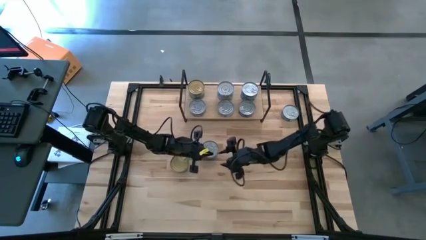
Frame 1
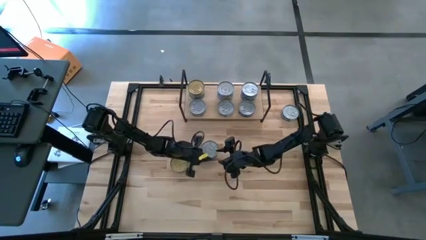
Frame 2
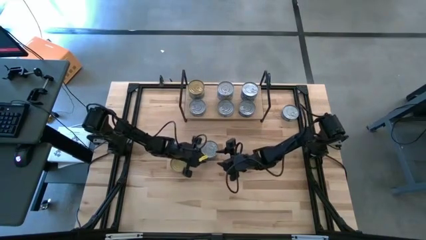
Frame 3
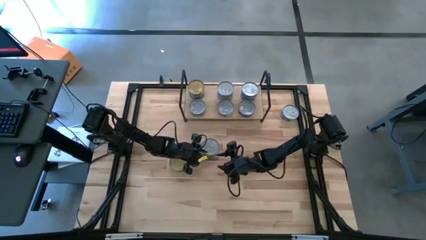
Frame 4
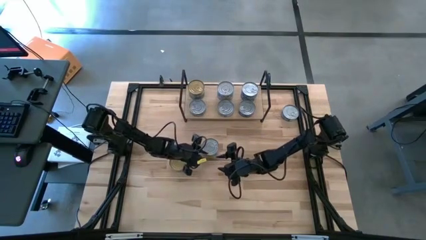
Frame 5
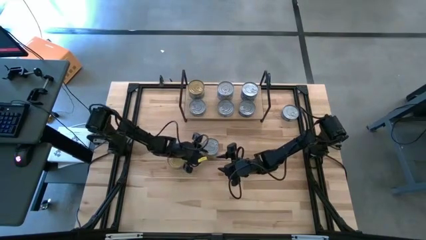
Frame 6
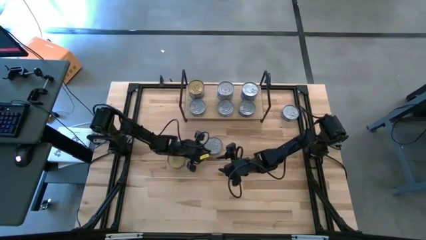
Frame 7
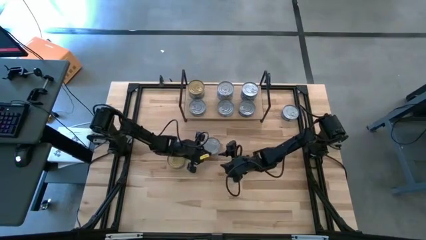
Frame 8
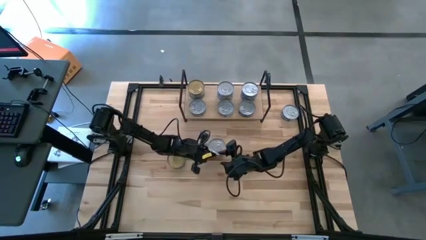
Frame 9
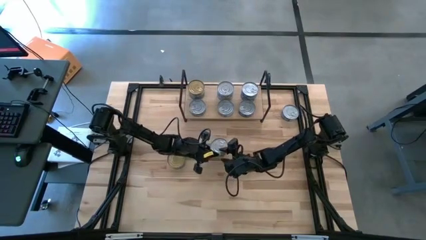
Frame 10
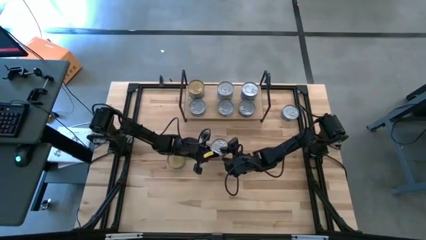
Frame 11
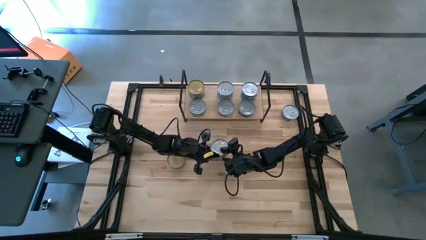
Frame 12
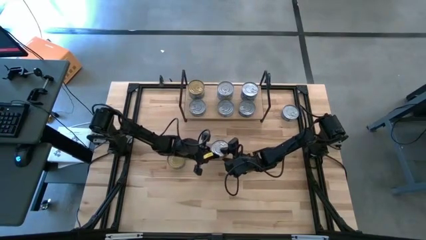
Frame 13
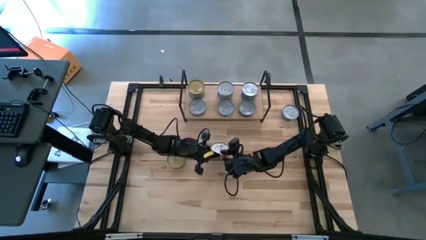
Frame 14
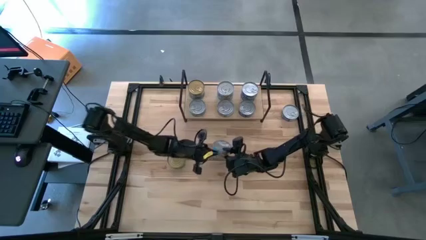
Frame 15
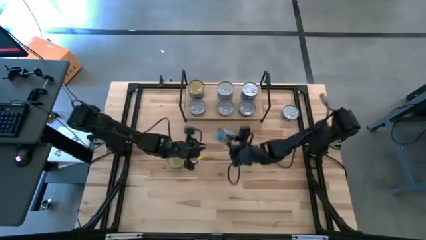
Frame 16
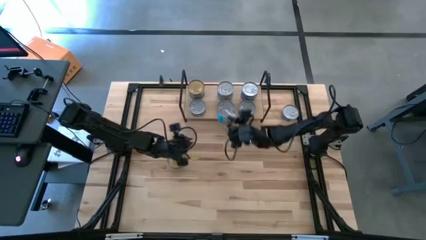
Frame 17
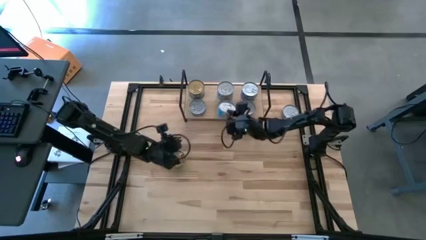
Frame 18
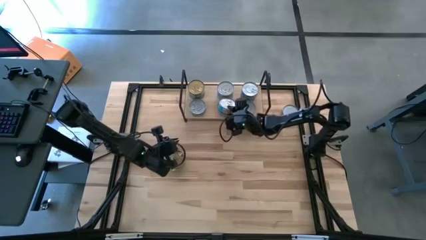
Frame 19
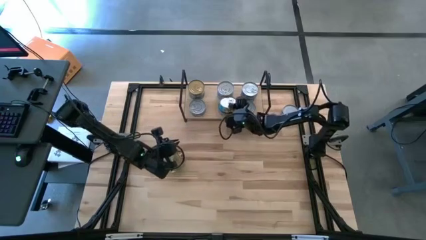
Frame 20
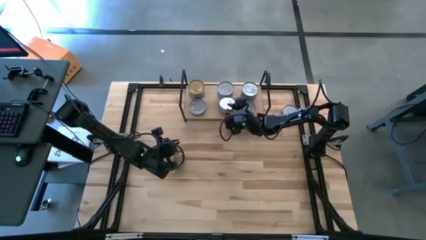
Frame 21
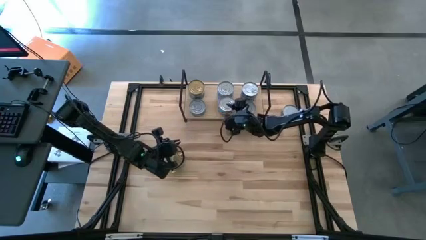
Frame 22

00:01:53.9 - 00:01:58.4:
Task: Stack canned seafood by type on shelf
Stack the yellow and blue tuna can on top of the other yellow and blue tuna can on the shelf

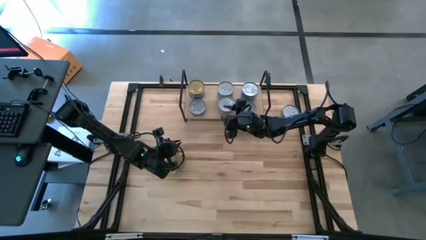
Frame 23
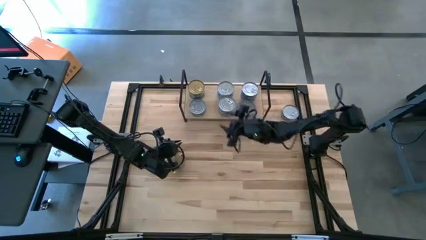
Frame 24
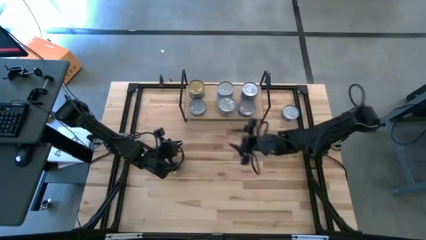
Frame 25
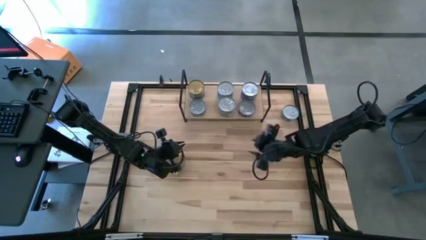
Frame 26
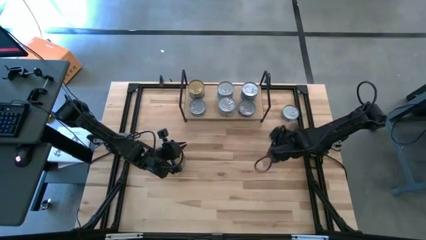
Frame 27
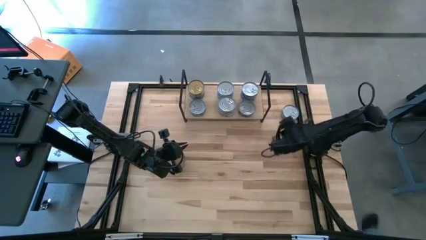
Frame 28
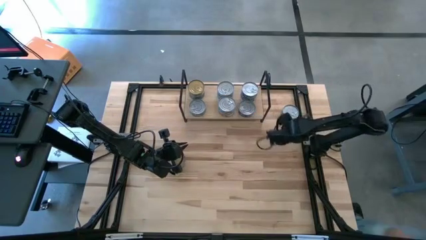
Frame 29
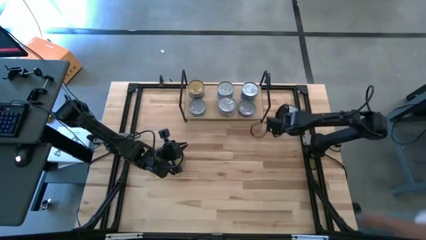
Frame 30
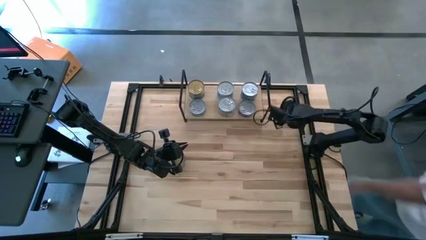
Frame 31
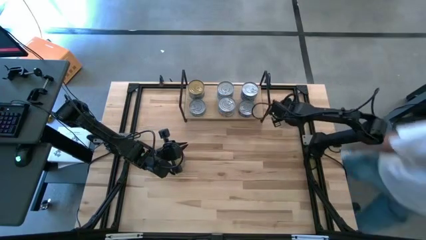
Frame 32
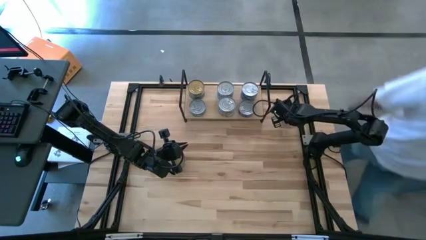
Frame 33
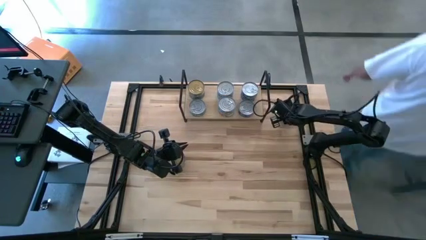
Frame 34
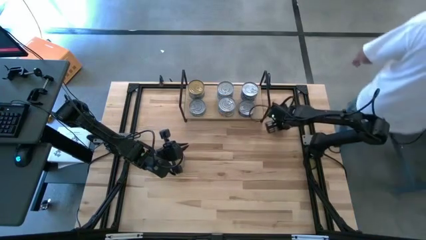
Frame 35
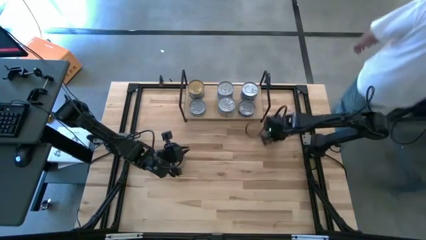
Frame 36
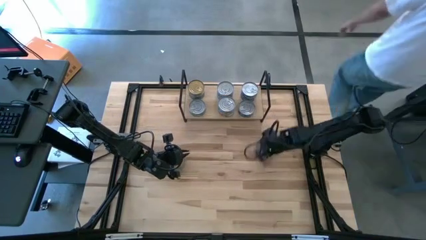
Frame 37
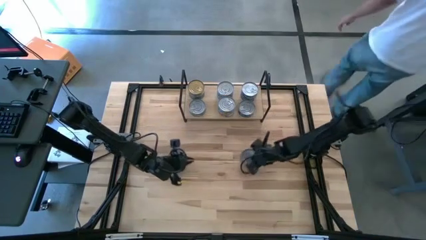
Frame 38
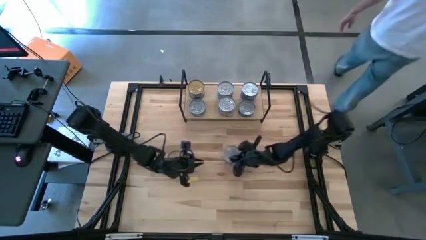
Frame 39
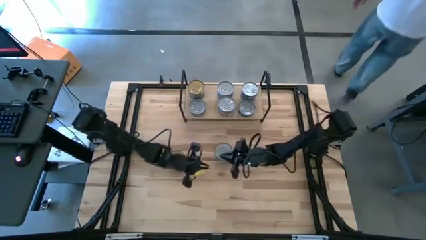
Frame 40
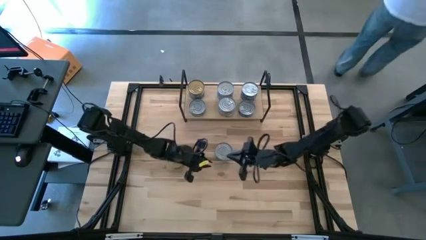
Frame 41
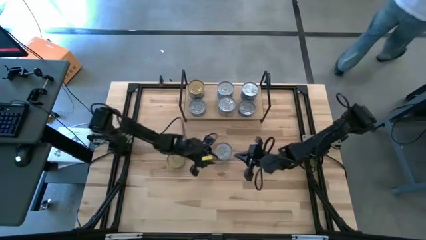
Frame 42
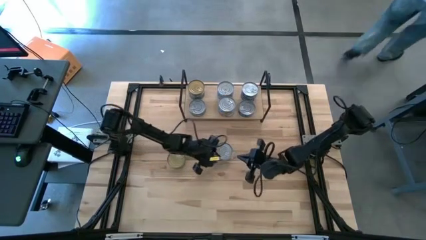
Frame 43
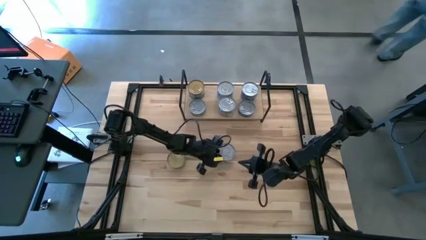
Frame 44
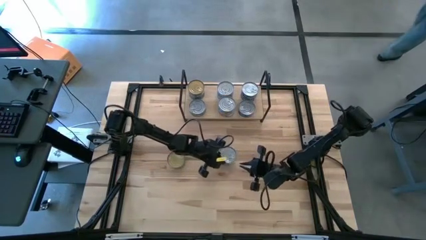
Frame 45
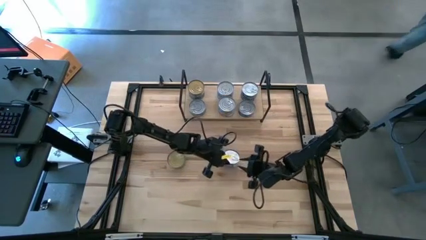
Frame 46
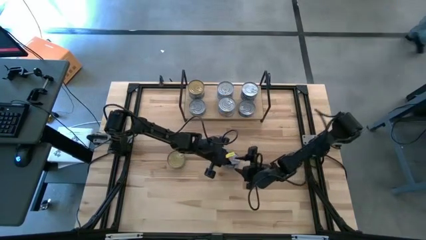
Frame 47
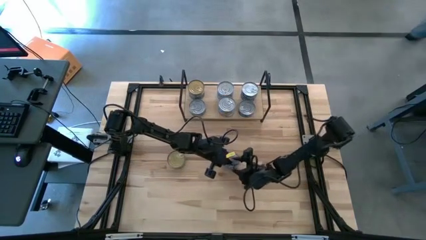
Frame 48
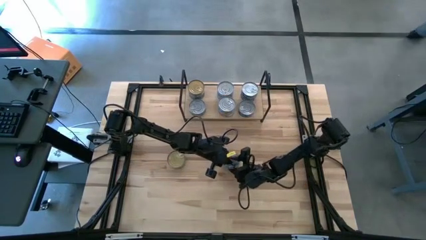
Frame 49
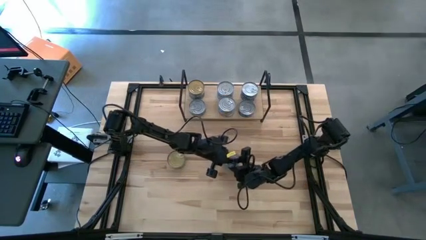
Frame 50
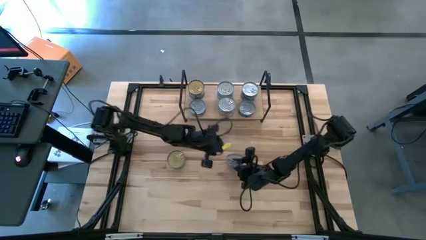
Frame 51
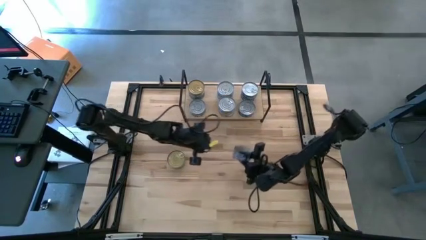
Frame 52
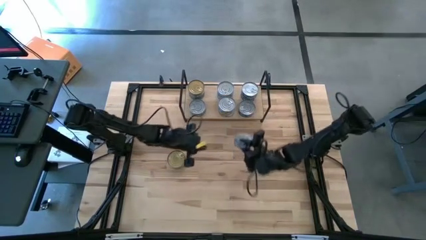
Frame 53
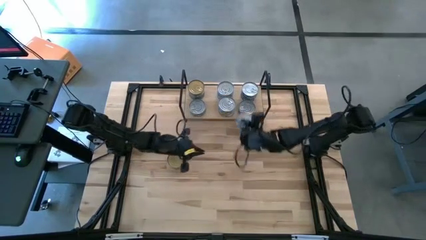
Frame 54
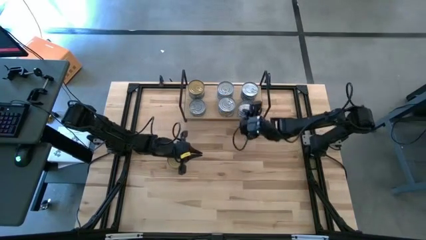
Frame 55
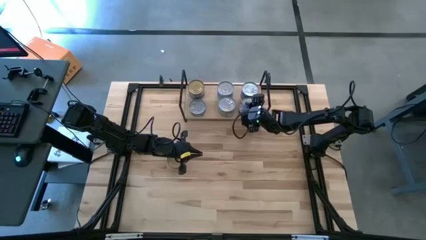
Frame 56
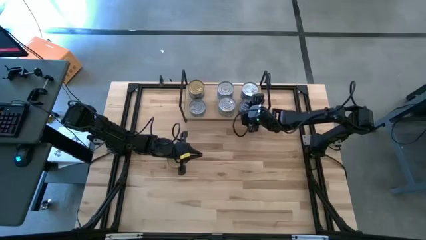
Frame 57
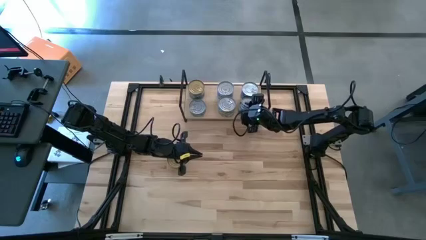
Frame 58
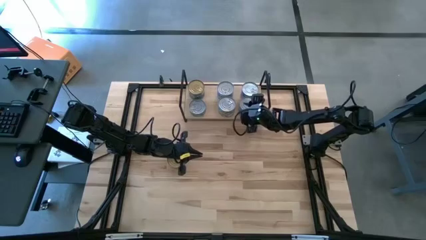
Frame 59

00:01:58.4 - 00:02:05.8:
Stack the blue tuna can on top of the other blue tuna can on the shelf
